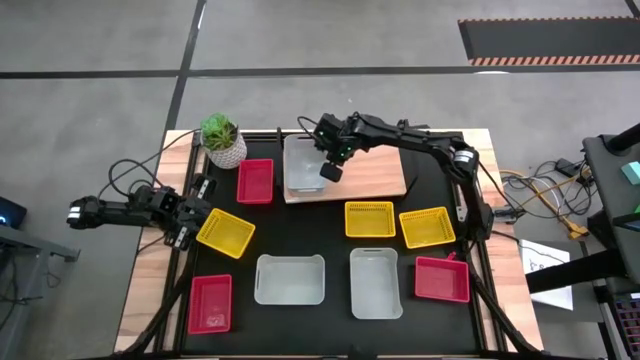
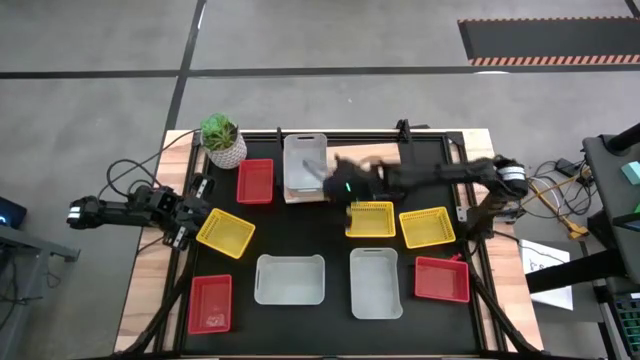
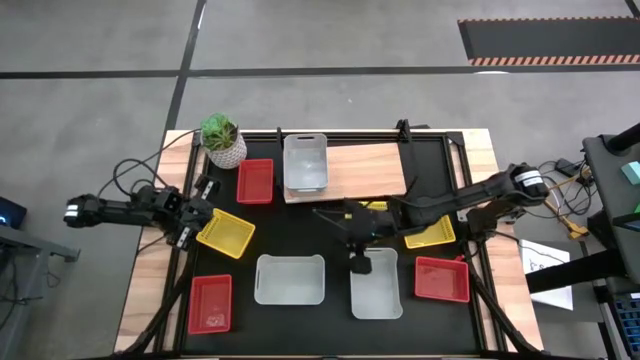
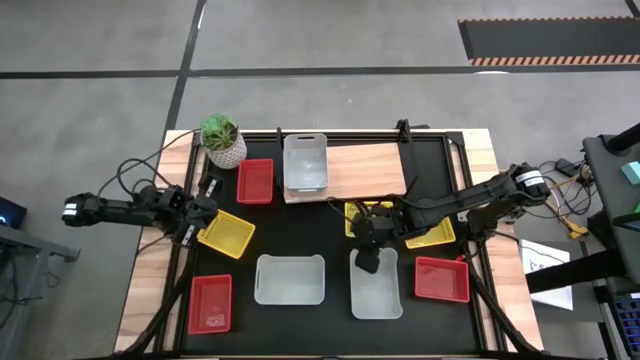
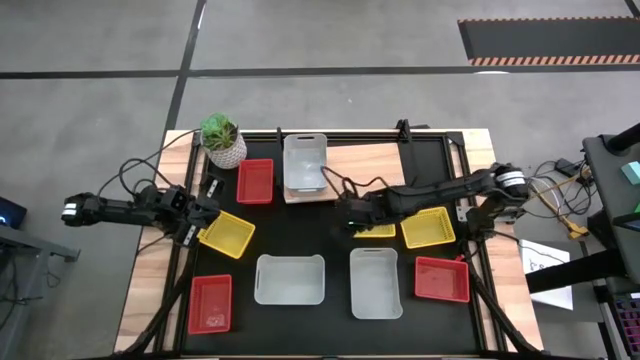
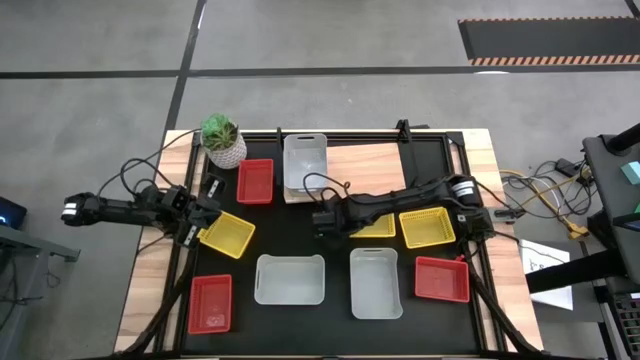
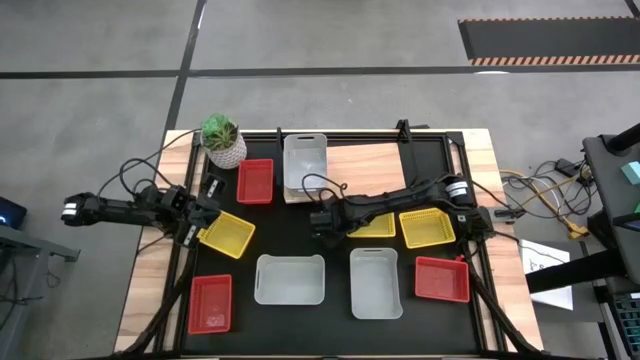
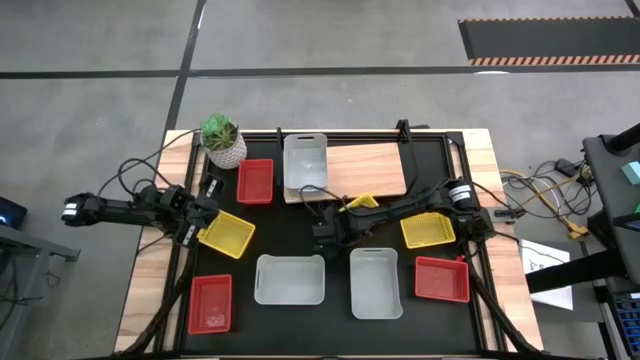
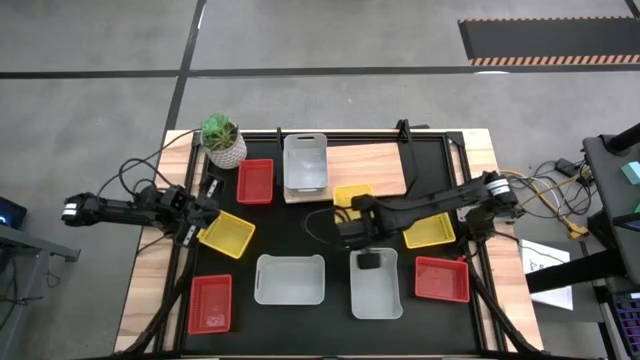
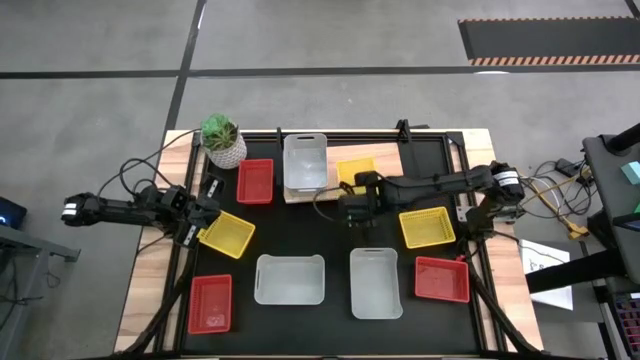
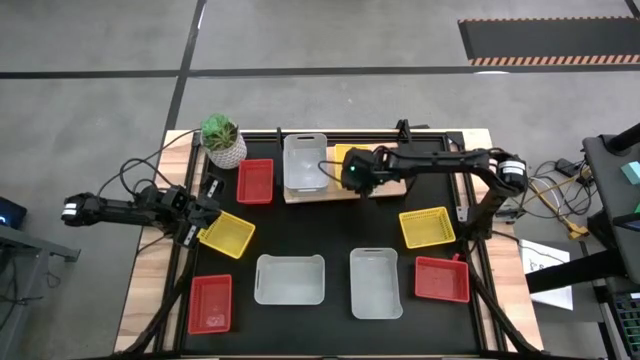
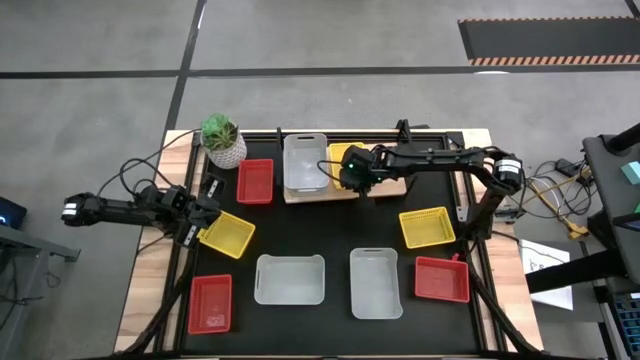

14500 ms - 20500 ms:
Task: Stack baskets on shelf by color
Put the middle yellow bin on the shelf

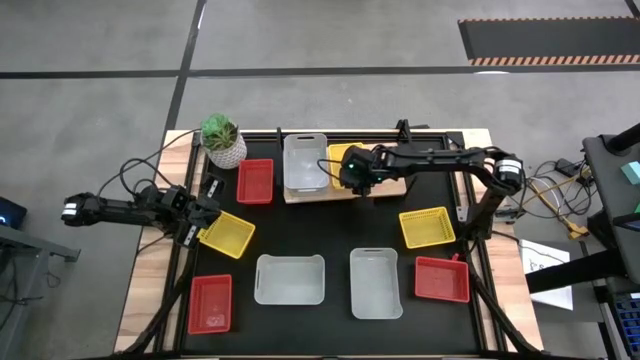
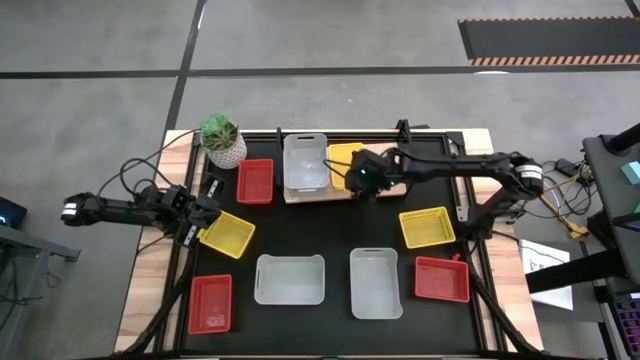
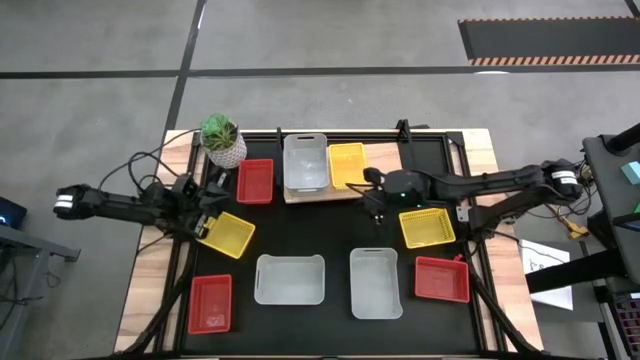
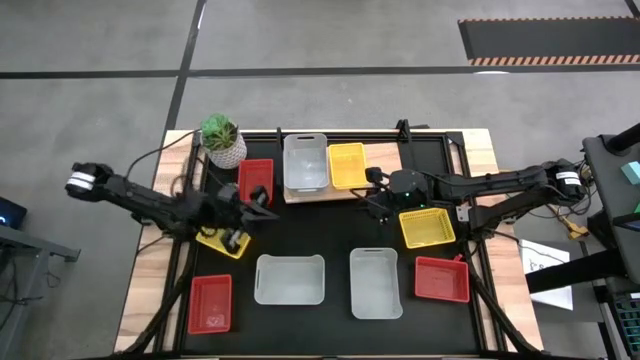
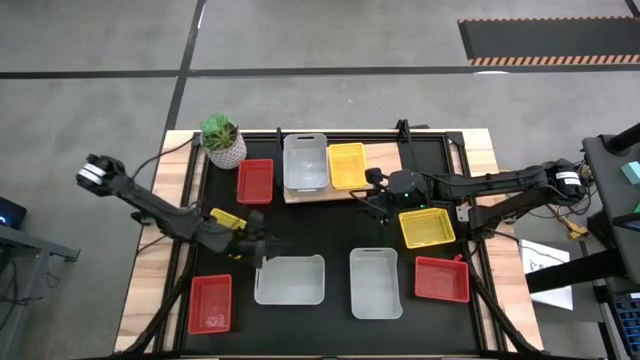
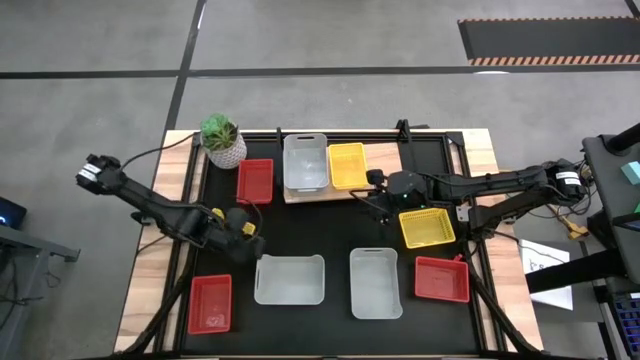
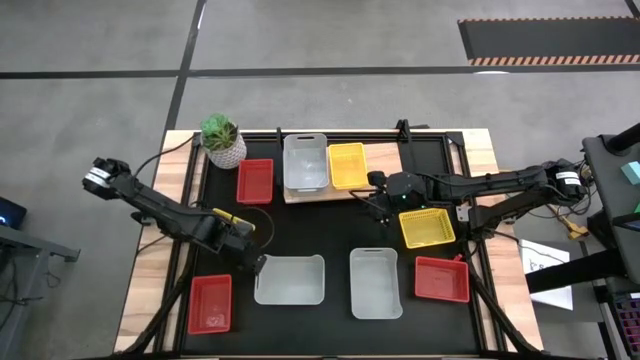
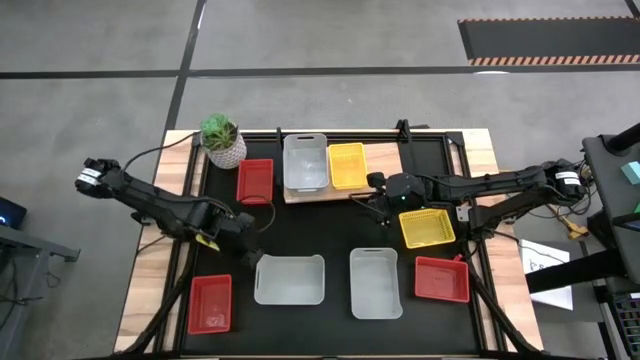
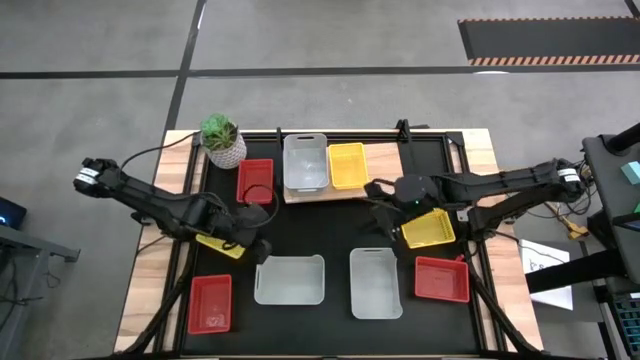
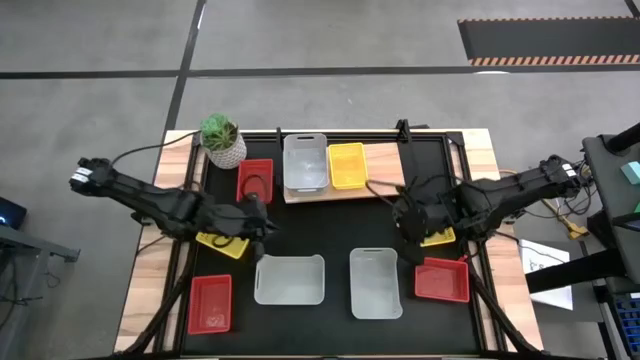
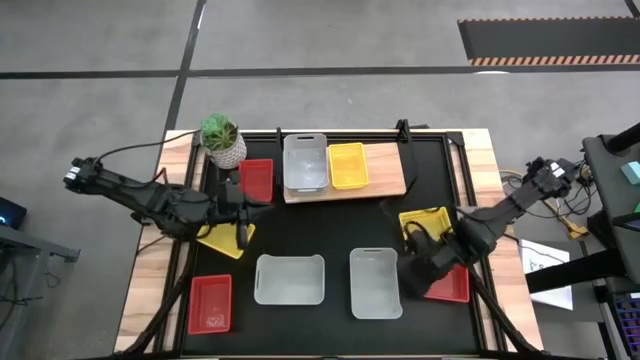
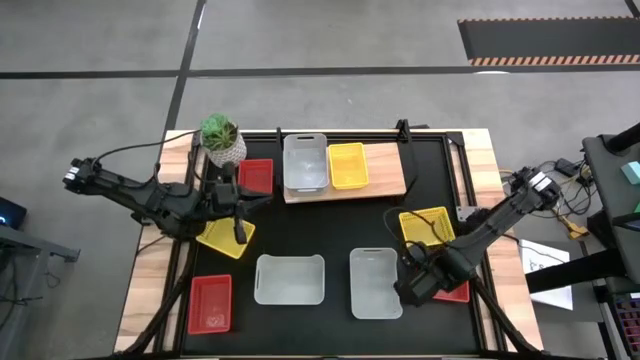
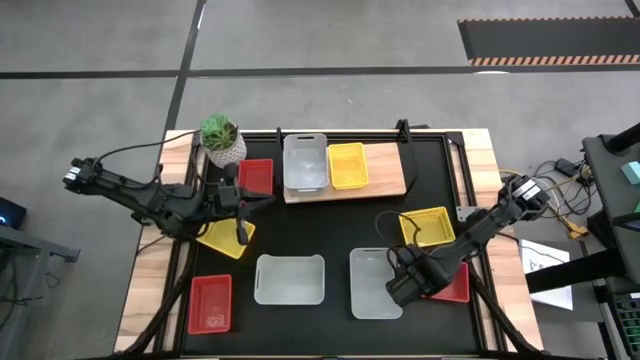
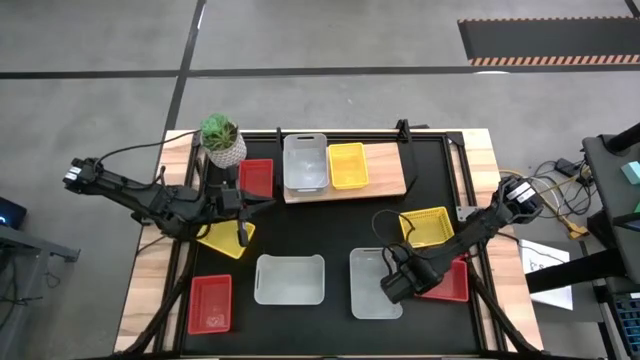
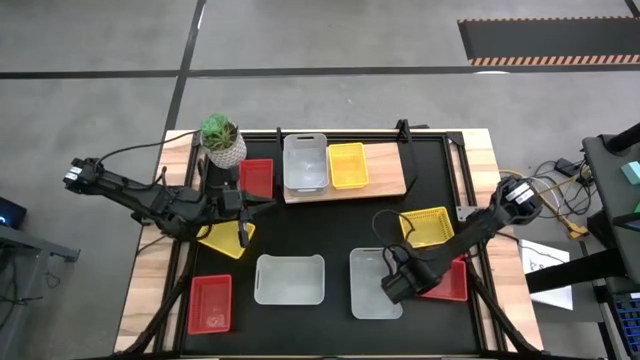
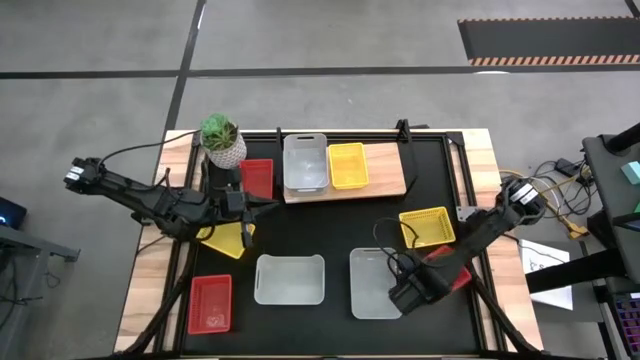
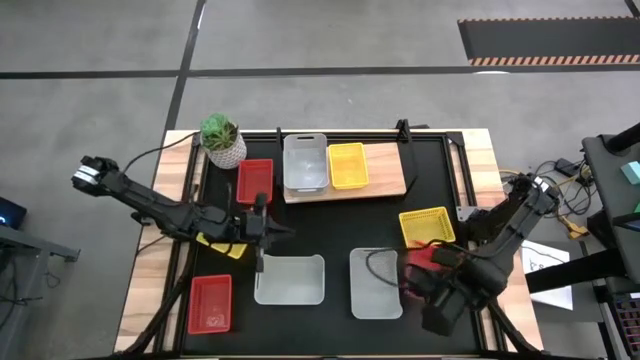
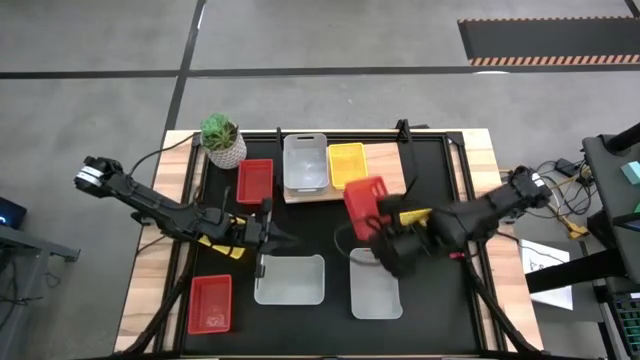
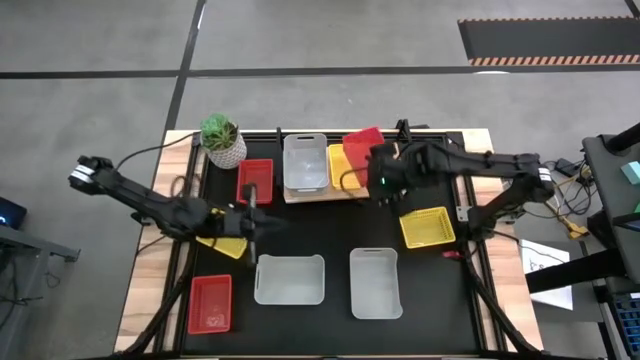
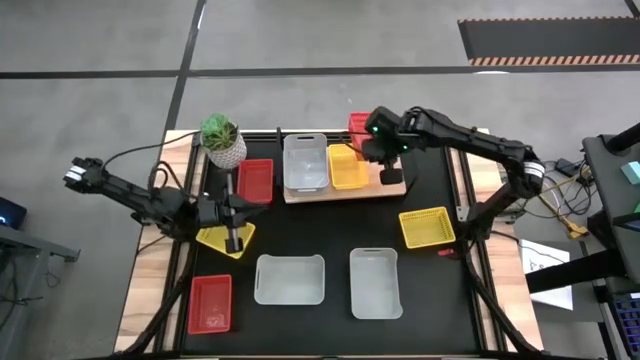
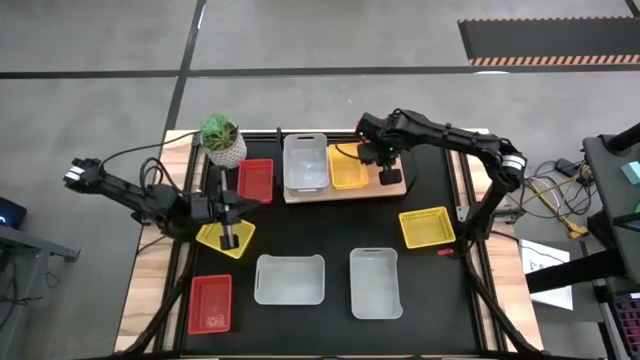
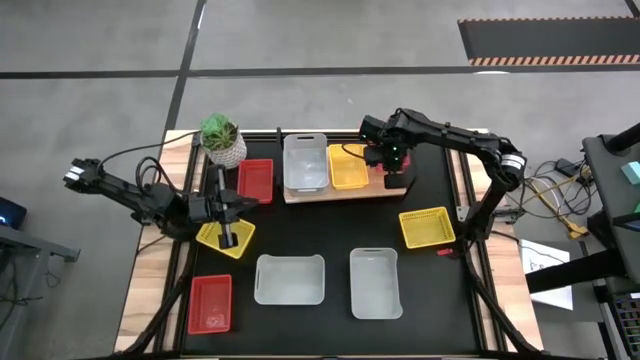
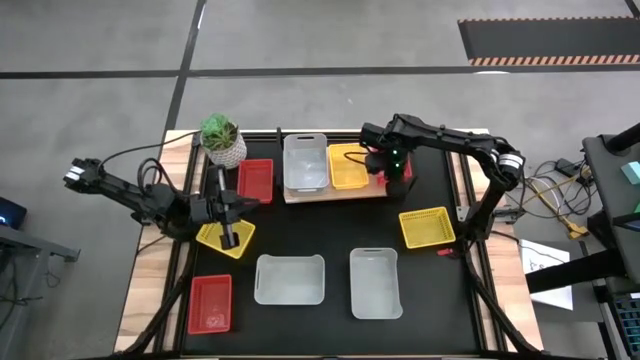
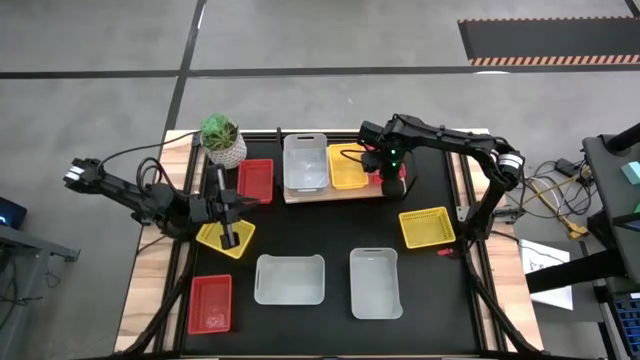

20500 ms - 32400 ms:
Put the bottom right red bin on the shelf

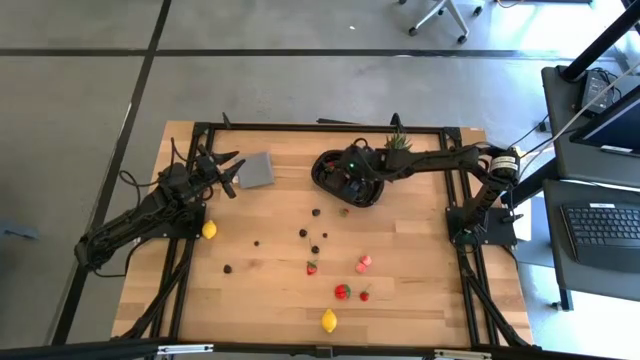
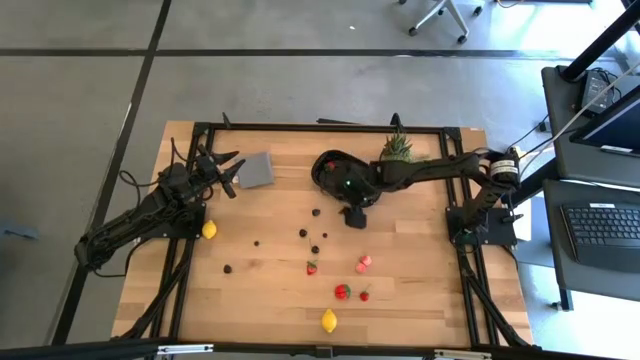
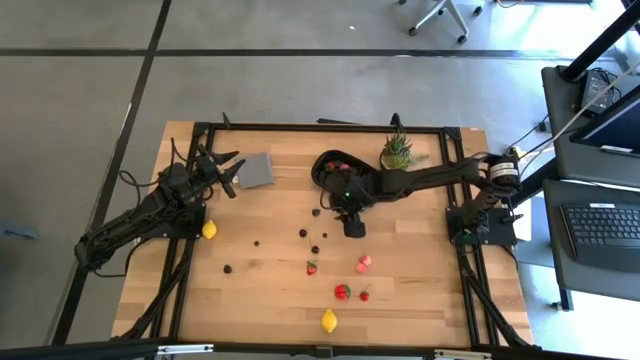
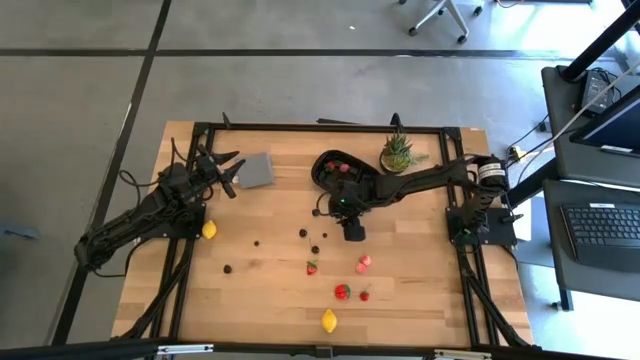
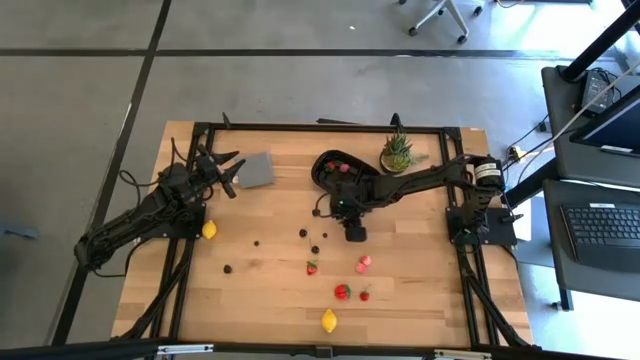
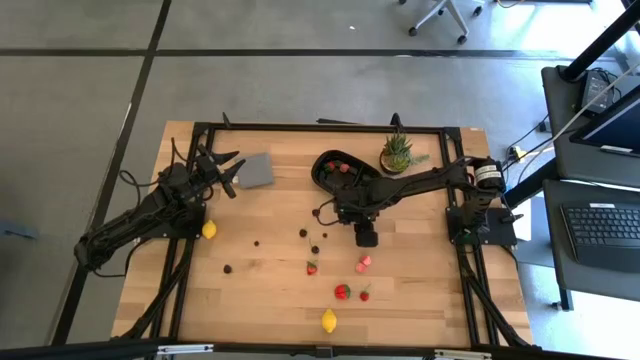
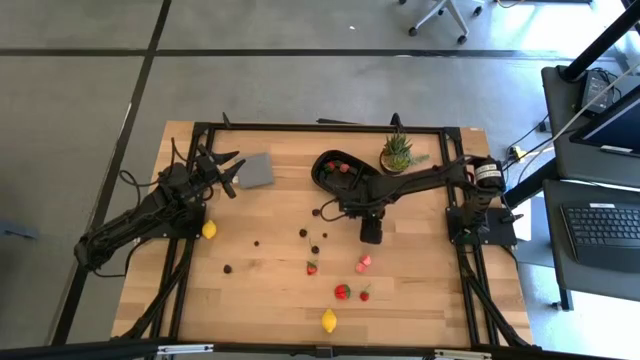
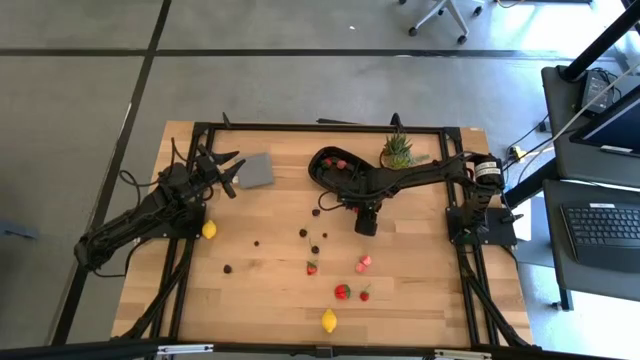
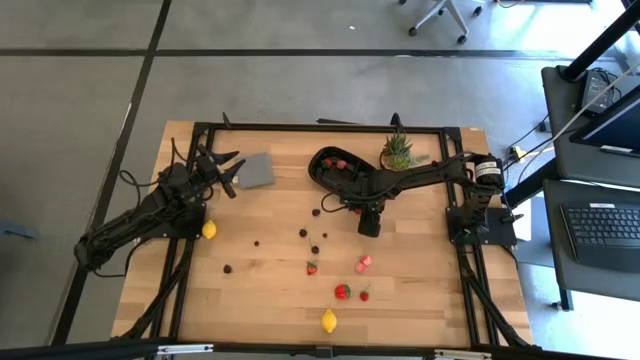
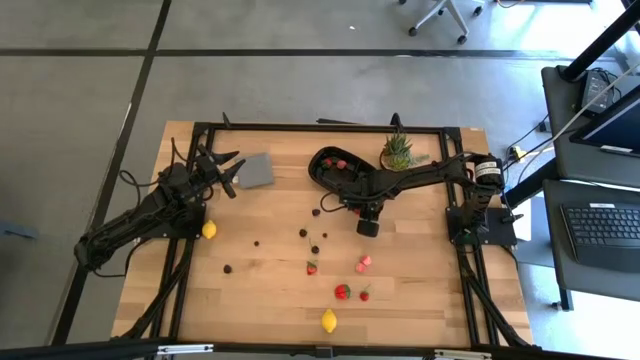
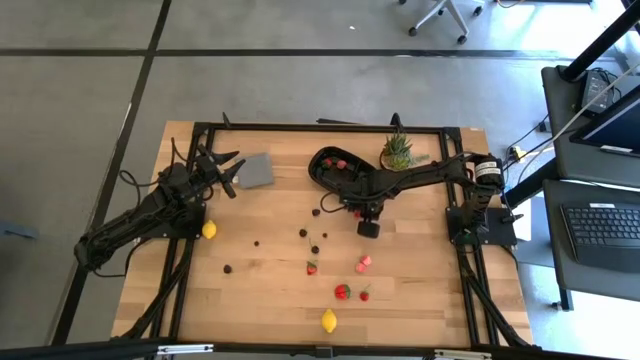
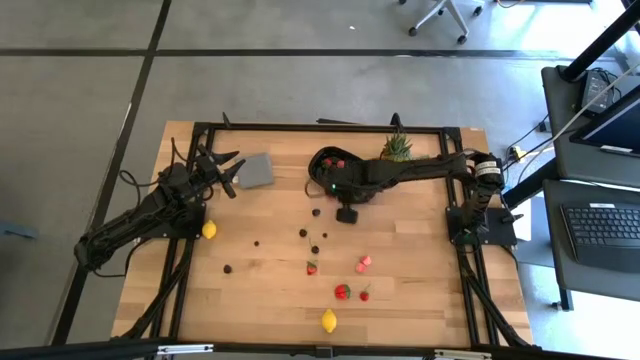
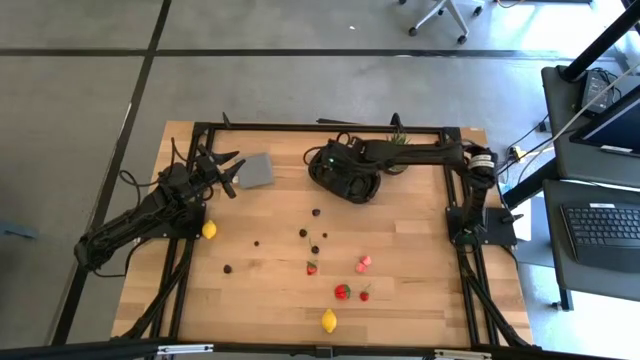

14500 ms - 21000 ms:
Task: Pick and placing Produce into tupperware
Put the strawberry into the black bin
